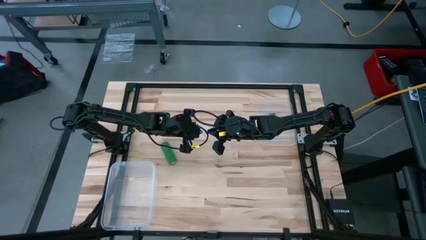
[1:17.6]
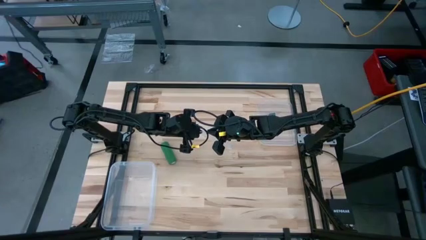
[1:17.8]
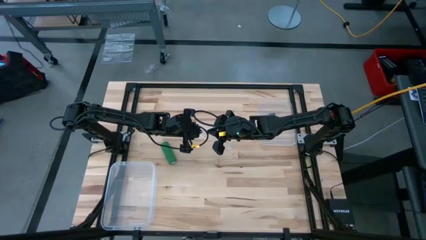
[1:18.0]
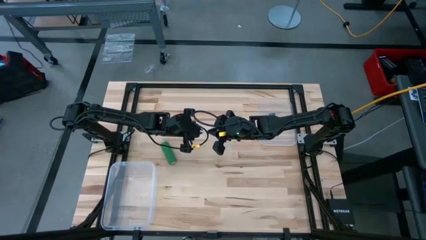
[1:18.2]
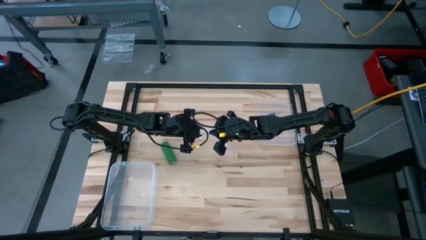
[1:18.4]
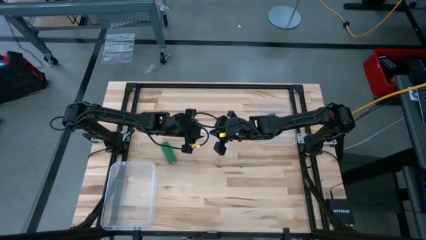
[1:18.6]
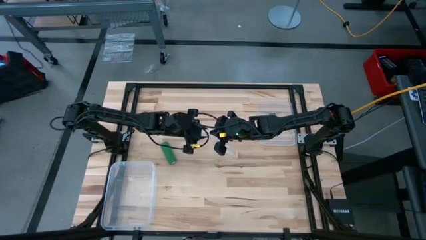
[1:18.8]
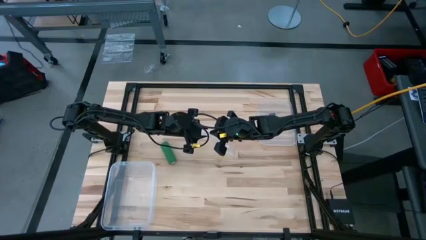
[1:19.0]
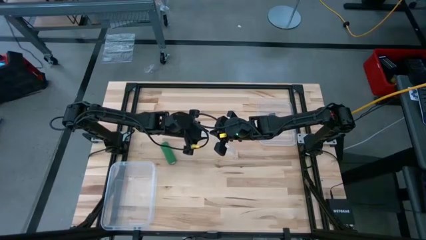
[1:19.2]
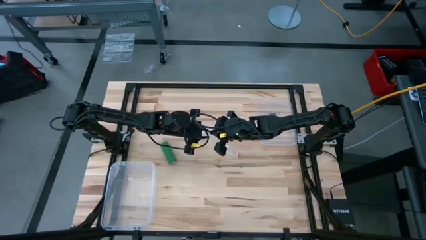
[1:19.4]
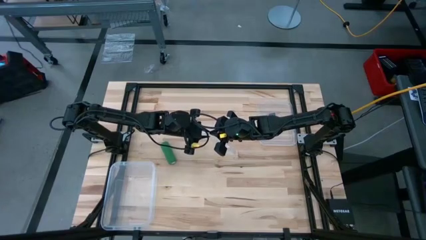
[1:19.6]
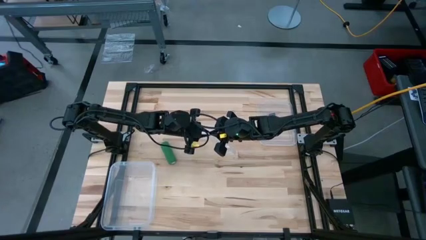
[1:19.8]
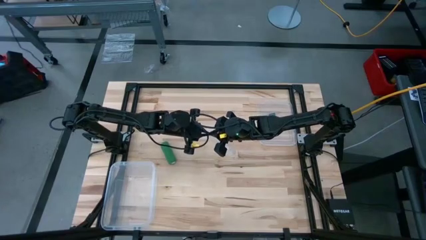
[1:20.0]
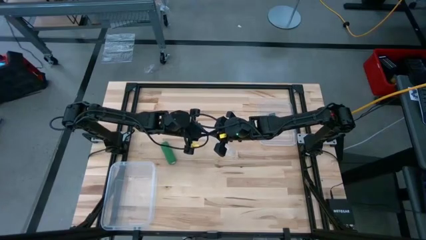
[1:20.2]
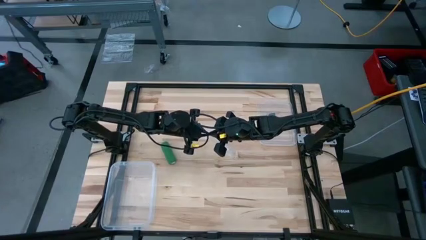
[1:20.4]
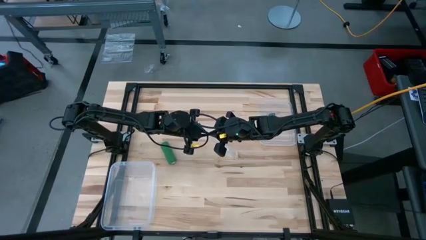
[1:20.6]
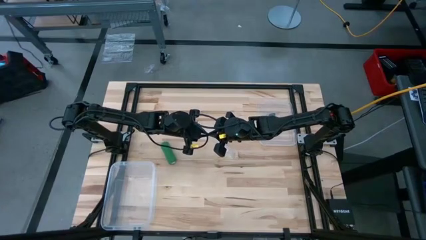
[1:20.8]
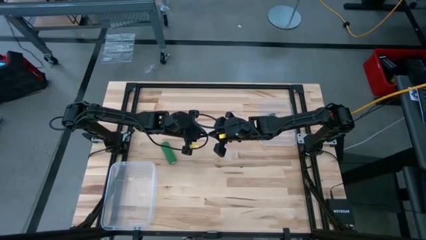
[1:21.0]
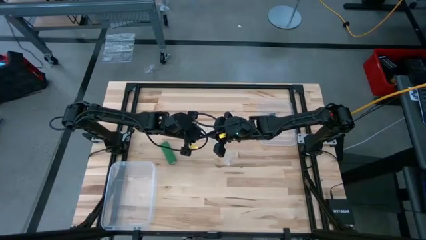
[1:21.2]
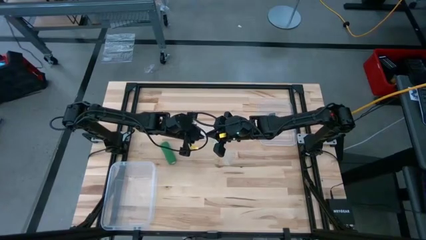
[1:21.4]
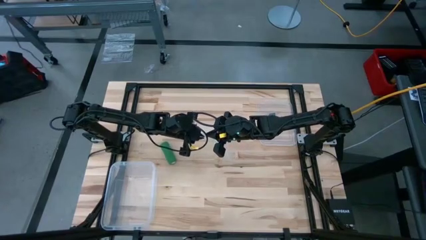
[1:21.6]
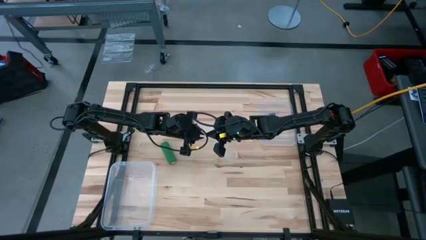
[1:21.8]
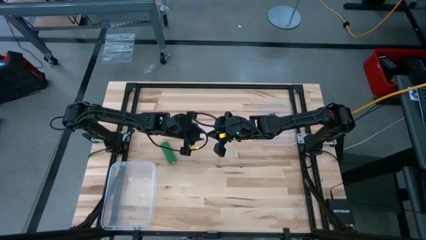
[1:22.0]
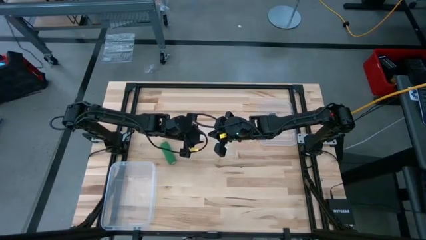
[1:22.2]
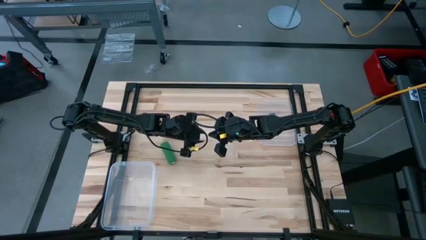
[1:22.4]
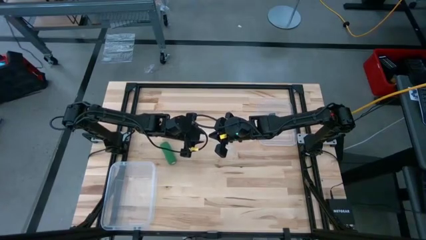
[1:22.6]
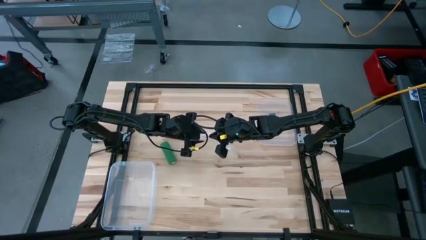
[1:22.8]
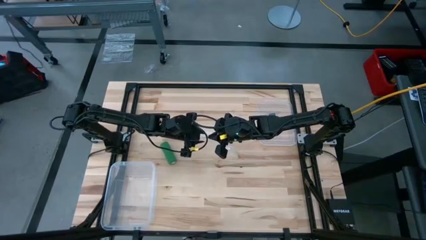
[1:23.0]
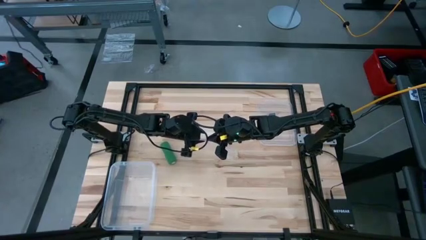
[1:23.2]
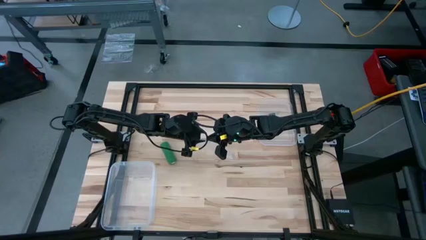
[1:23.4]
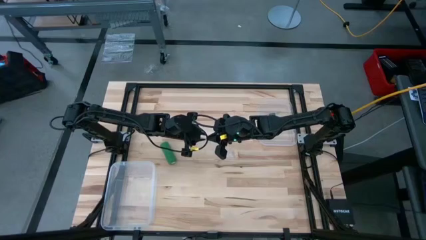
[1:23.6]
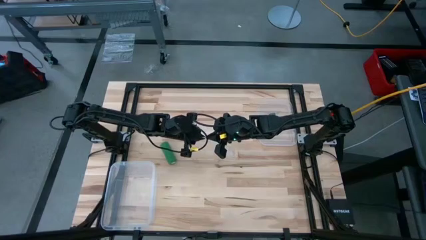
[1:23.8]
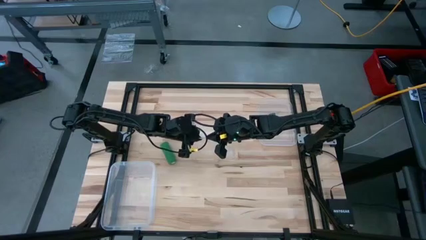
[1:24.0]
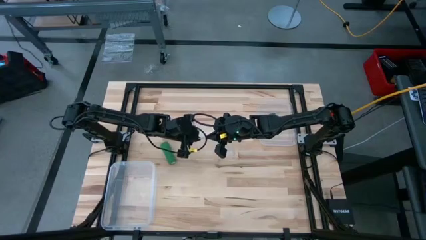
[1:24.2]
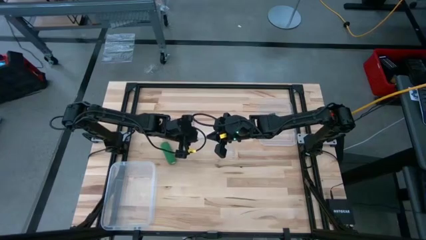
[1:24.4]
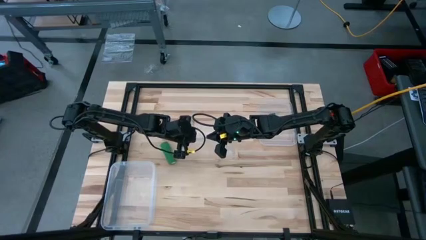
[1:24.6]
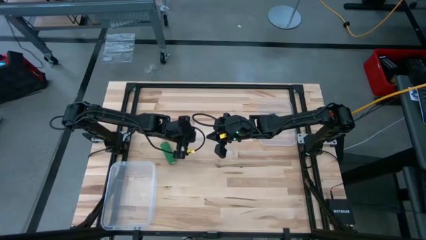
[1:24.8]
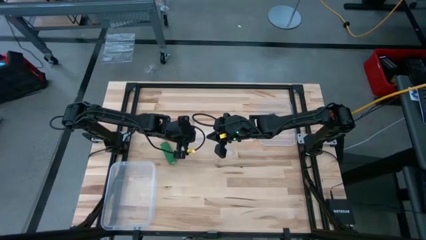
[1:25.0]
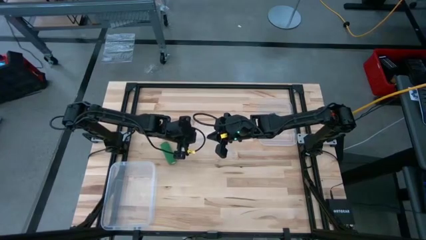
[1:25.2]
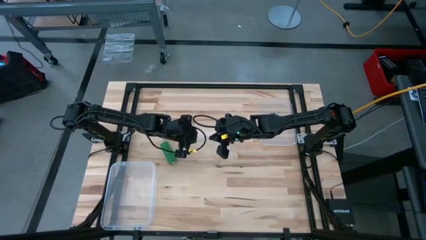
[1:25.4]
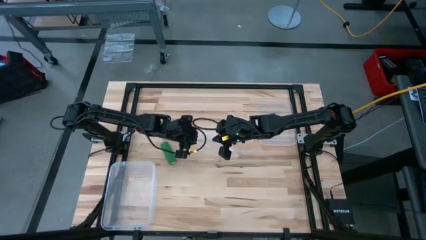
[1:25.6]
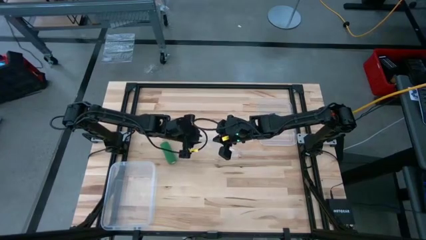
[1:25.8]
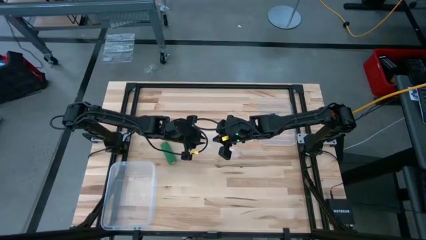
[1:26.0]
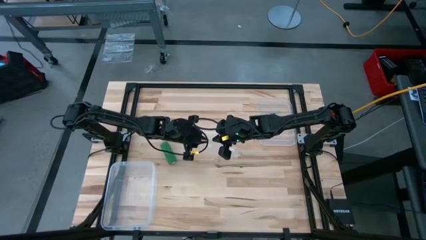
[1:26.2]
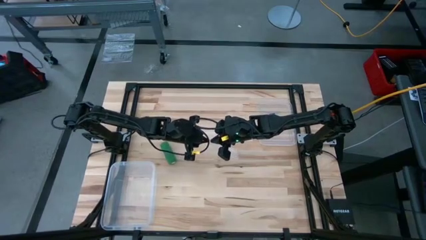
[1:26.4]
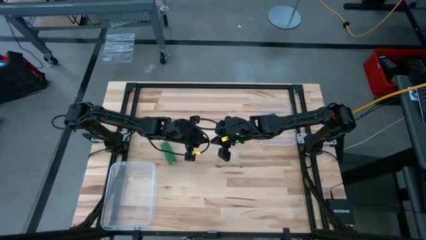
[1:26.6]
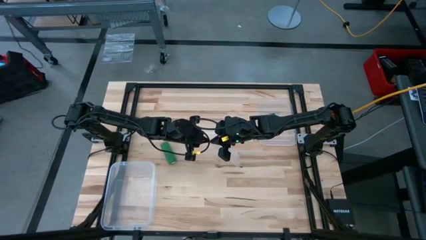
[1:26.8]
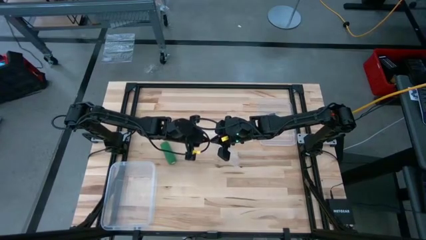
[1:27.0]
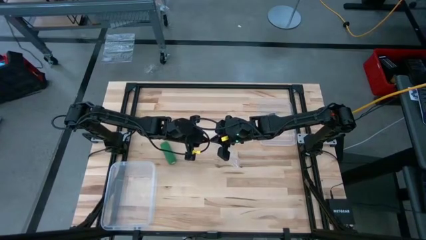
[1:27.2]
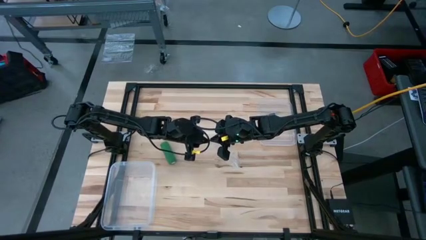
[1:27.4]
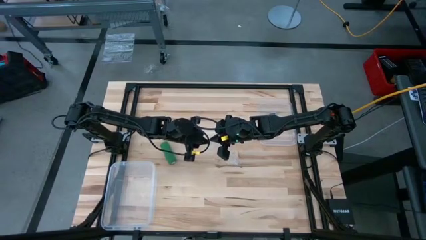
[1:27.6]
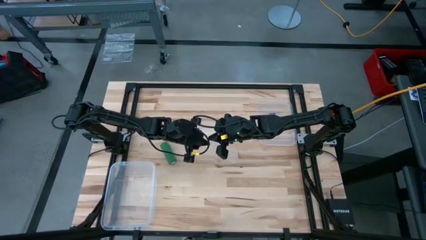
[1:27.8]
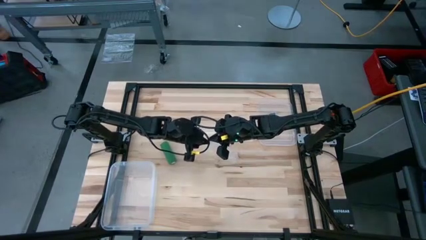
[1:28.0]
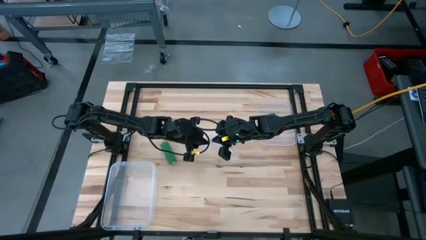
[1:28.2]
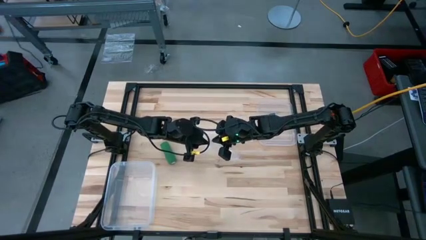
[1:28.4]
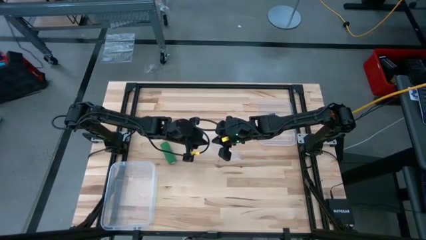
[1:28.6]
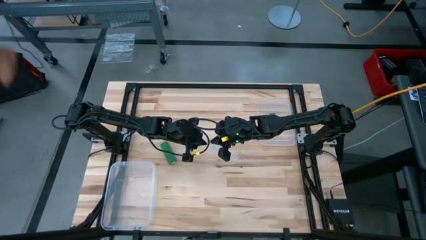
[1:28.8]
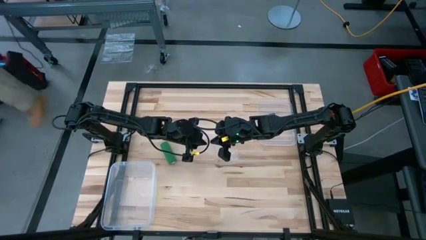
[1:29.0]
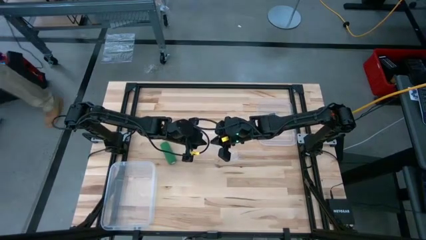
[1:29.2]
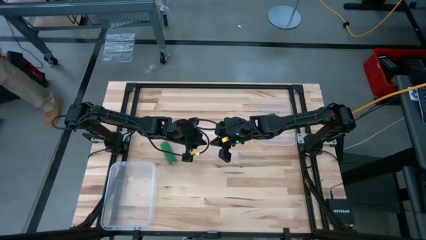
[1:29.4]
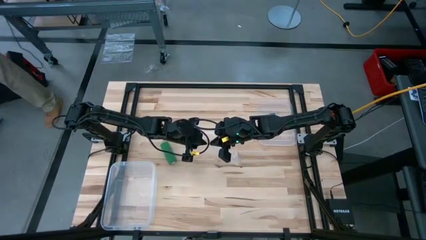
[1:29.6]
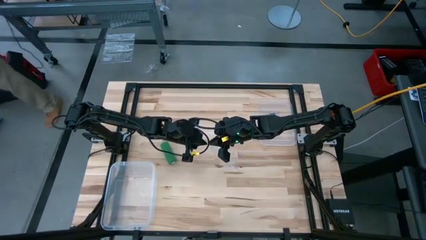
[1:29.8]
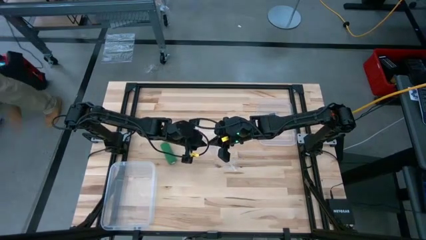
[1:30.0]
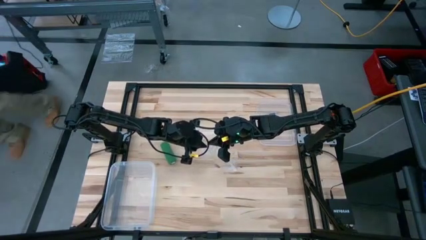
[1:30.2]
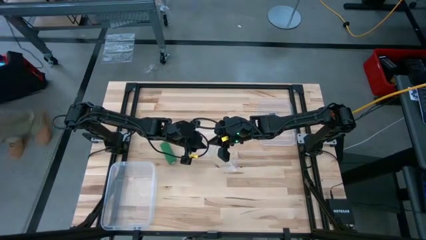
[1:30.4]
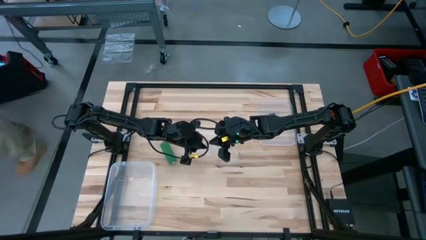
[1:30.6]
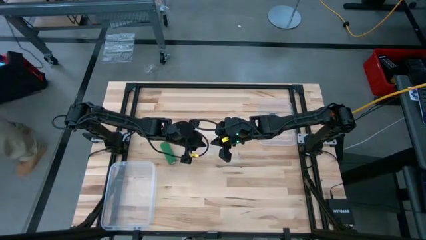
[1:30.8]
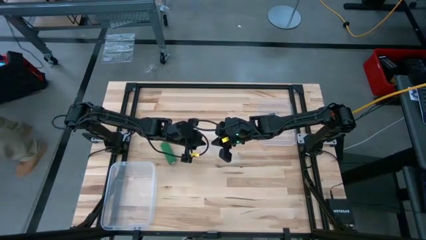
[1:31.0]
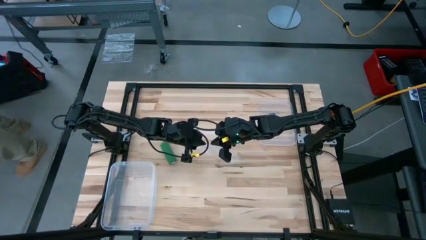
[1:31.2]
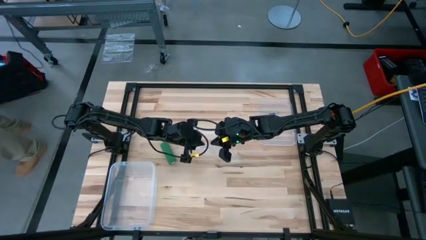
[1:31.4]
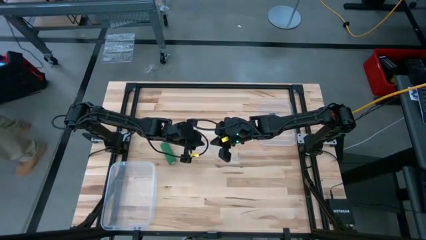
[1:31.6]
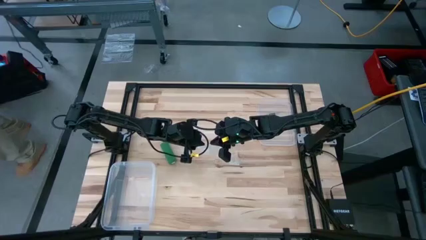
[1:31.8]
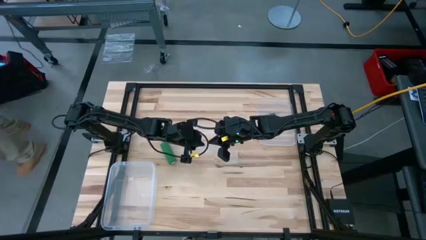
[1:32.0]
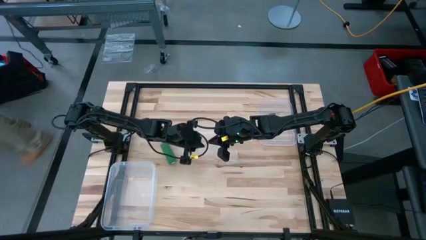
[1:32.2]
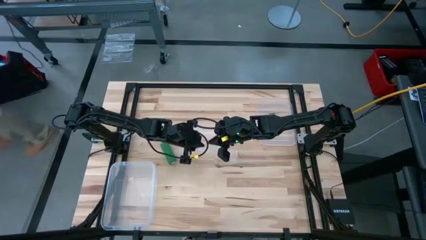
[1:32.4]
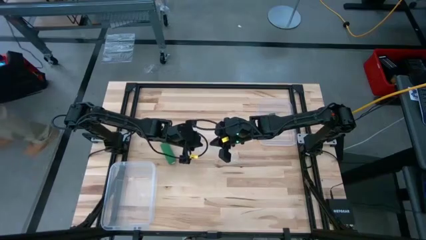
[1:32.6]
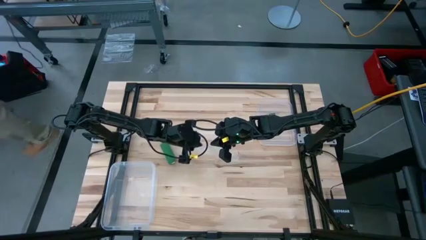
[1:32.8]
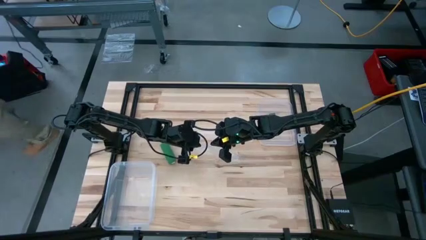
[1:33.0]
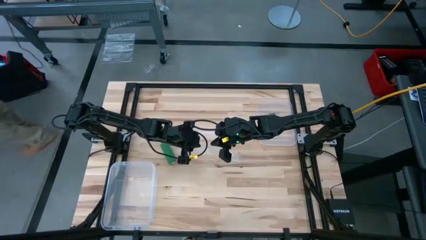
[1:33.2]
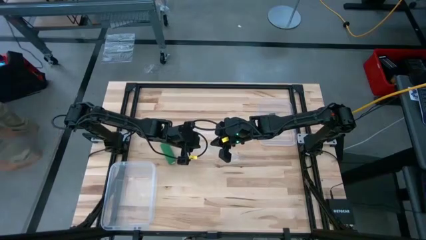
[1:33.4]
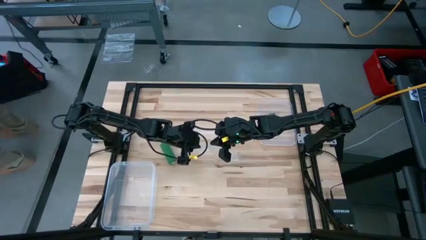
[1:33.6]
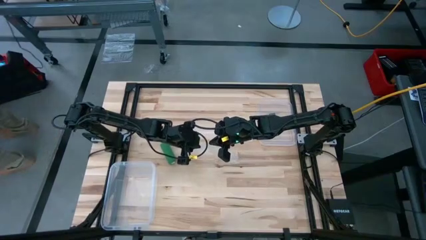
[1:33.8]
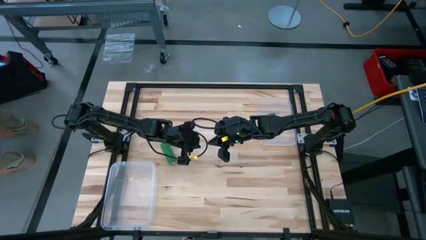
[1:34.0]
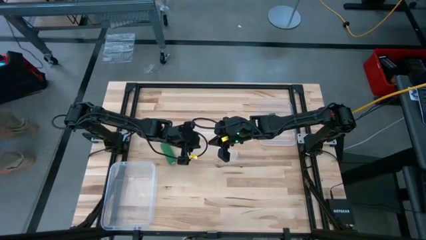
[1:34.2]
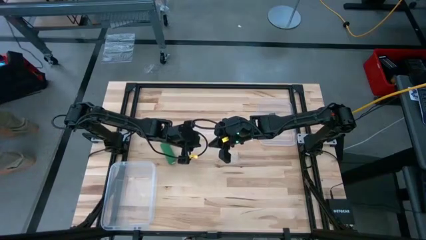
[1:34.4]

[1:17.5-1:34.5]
Task: Roll bandage
Open the zip bag
